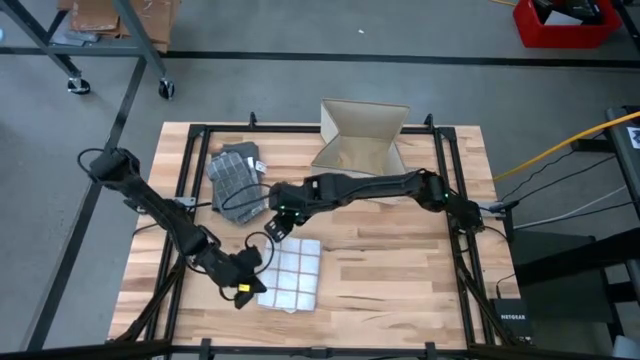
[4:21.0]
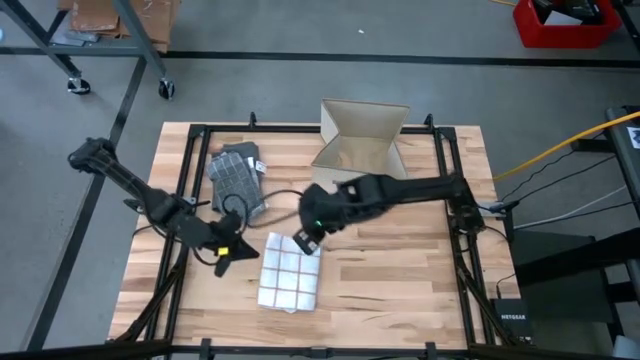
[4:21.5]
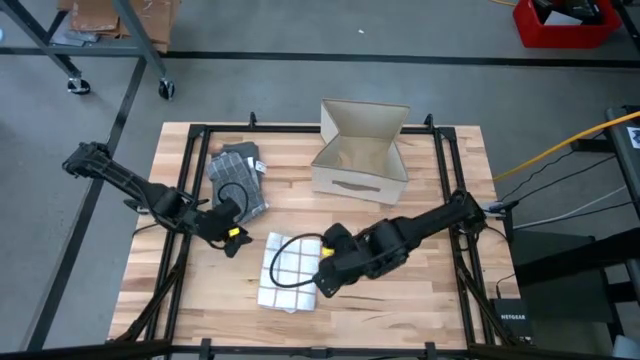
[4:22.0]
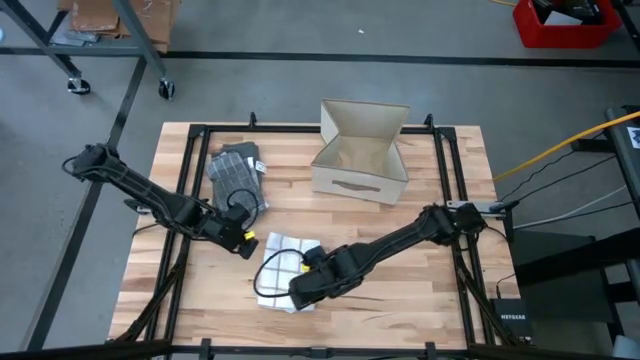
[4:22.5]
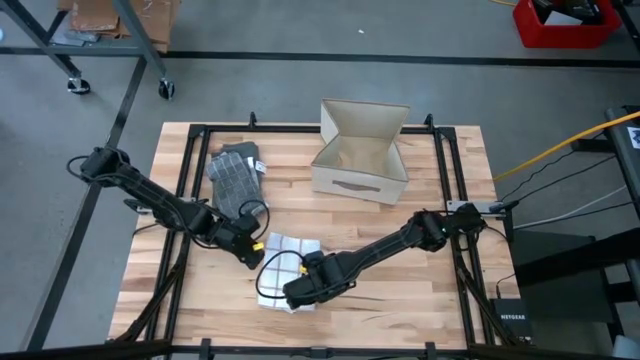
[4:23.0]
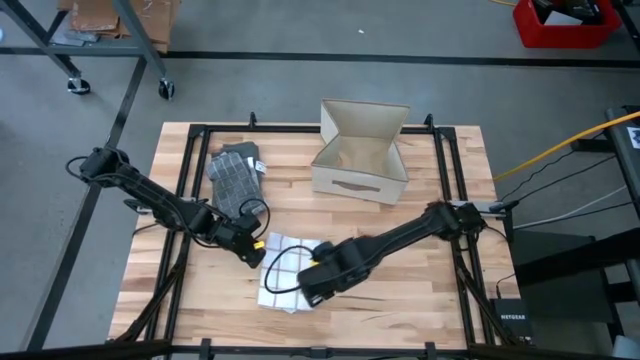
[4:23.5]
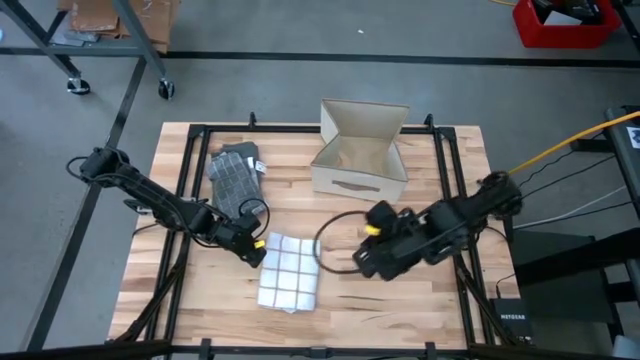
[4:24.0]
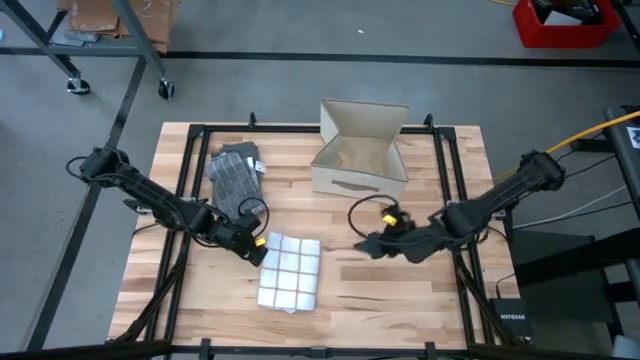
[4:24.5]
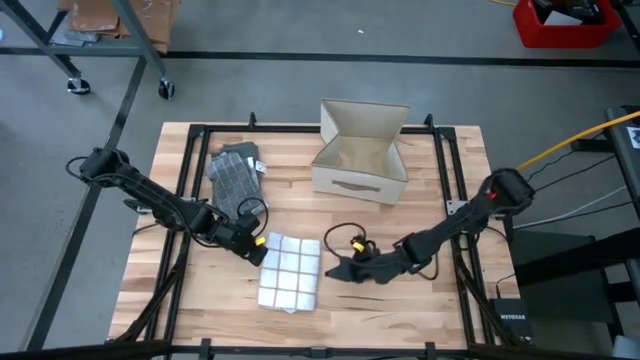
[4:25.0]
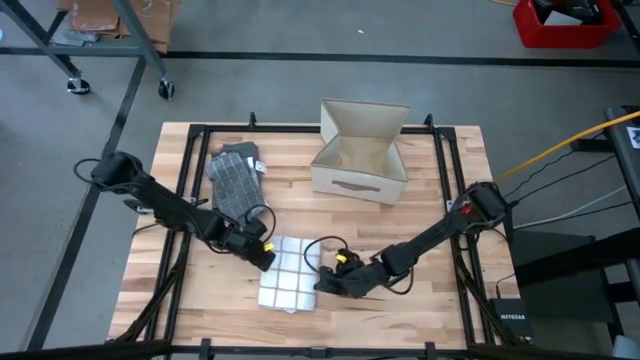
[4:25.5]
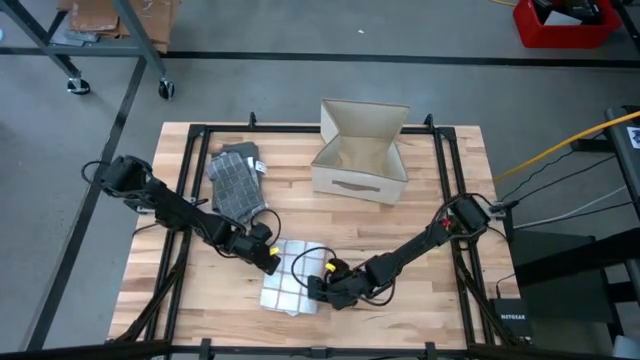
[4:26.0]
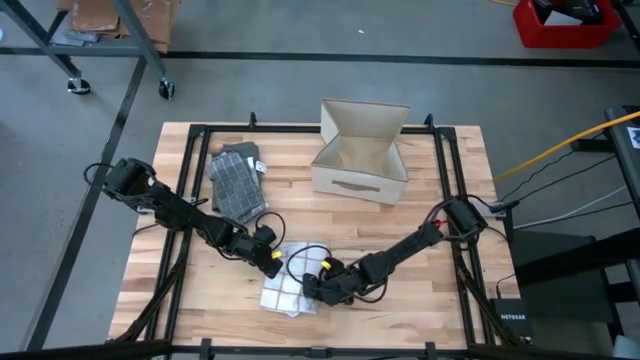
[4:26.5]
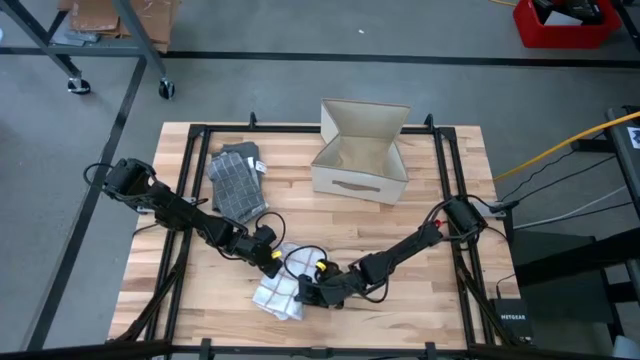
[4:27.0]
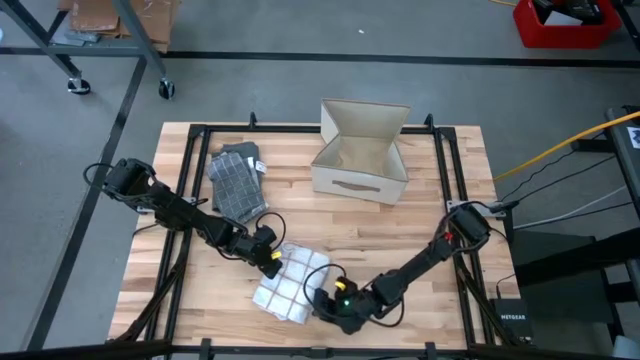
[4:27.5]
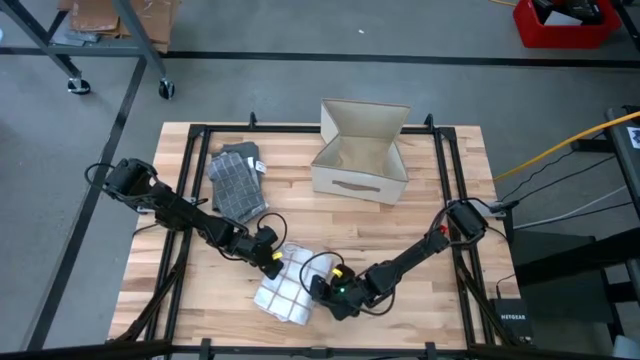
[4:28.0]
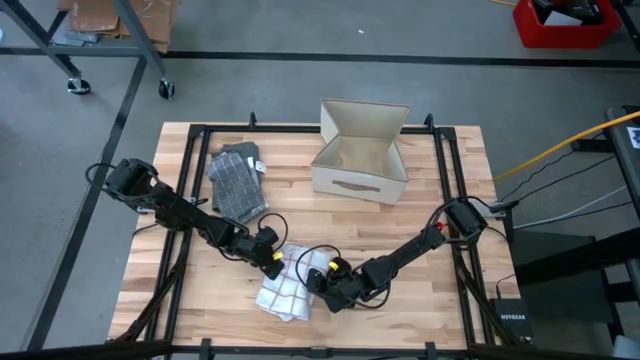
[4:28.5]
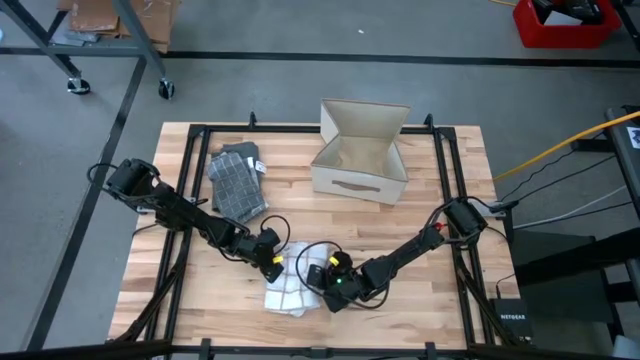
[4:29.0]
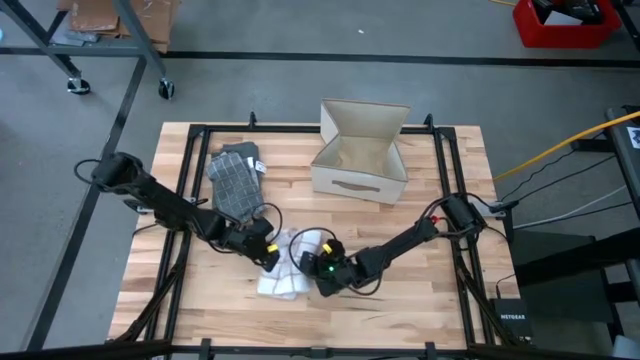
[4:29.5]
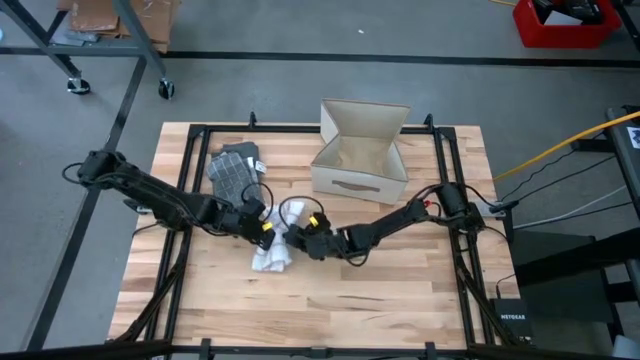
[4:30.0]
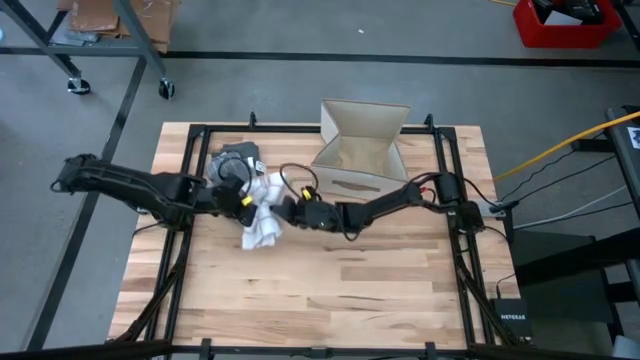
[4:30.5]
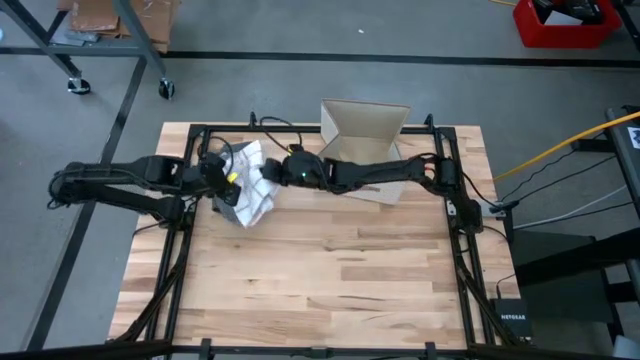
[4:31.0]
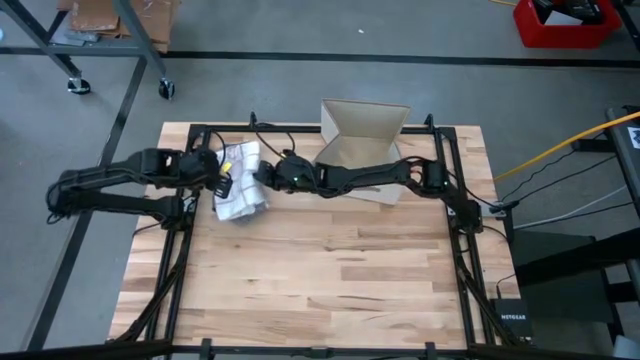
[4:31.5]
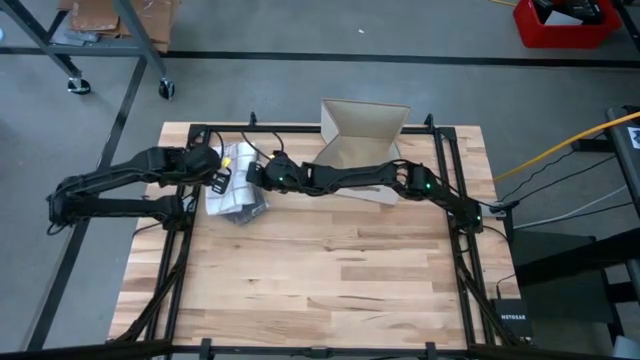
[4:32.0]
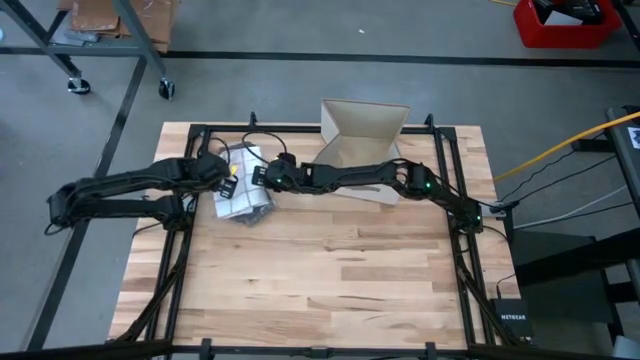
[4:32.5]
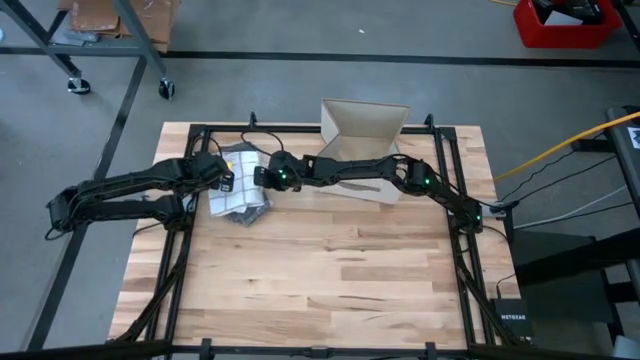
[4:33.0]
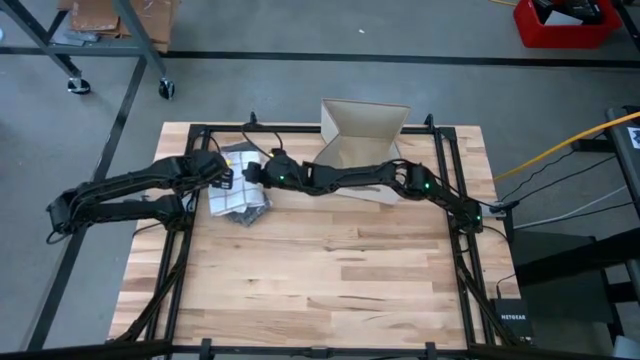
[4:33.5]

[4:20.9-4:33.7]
Task: Fold towel
Stack the white towel on top of the gray patterned towel
